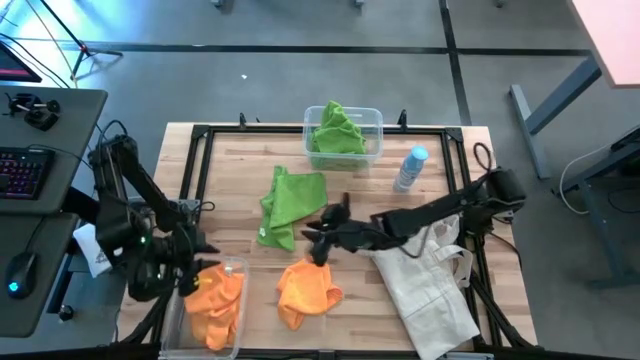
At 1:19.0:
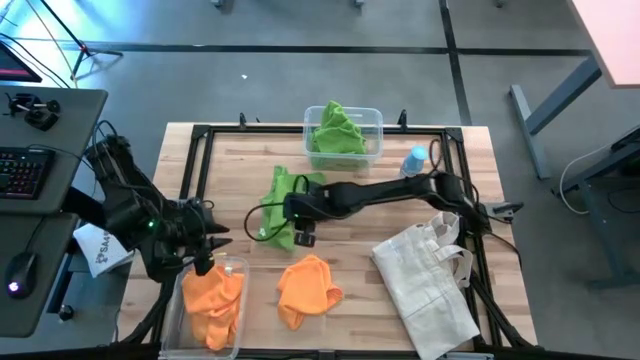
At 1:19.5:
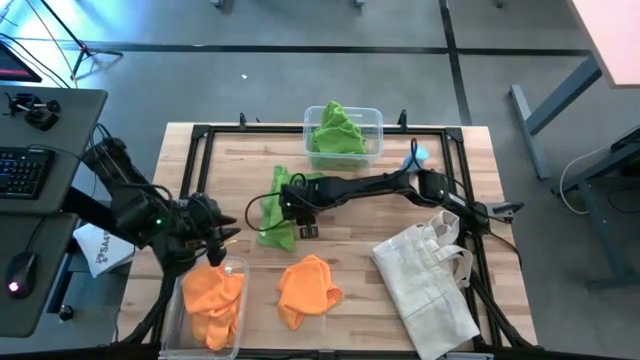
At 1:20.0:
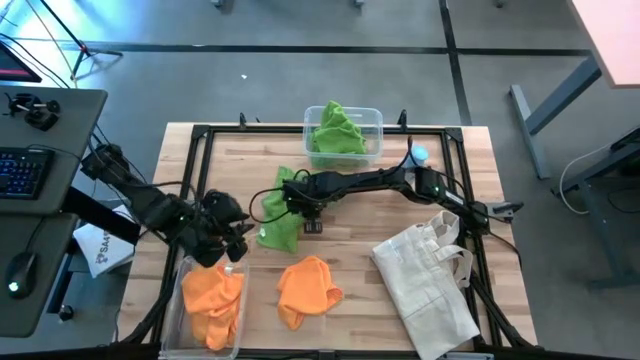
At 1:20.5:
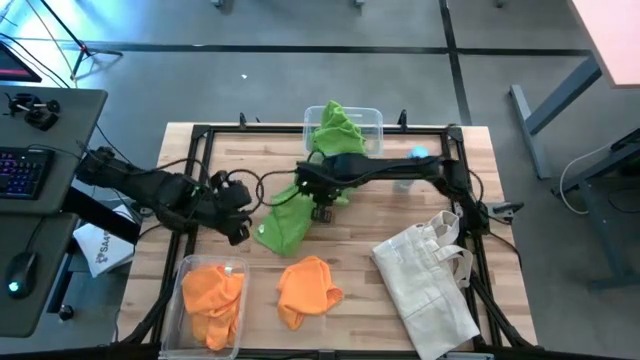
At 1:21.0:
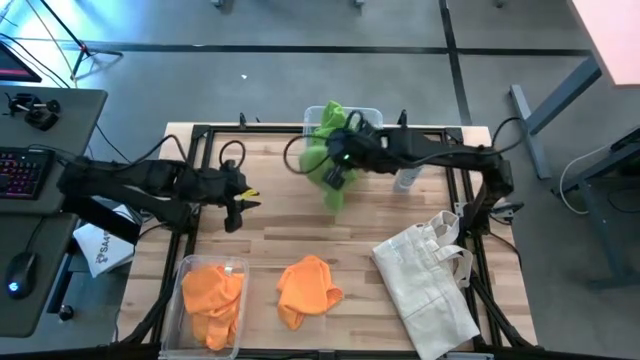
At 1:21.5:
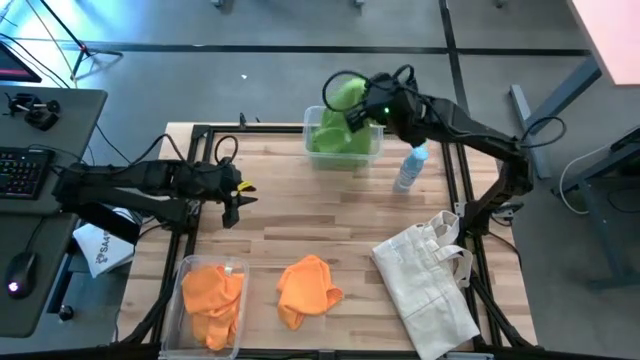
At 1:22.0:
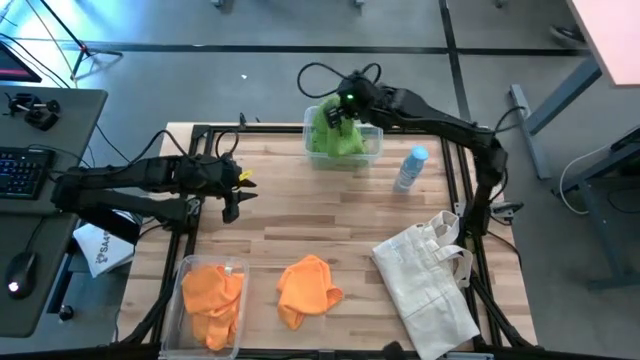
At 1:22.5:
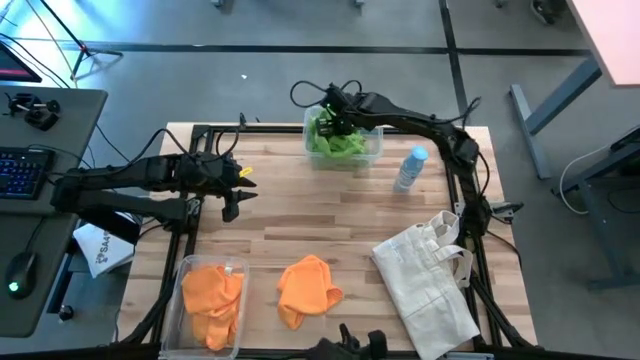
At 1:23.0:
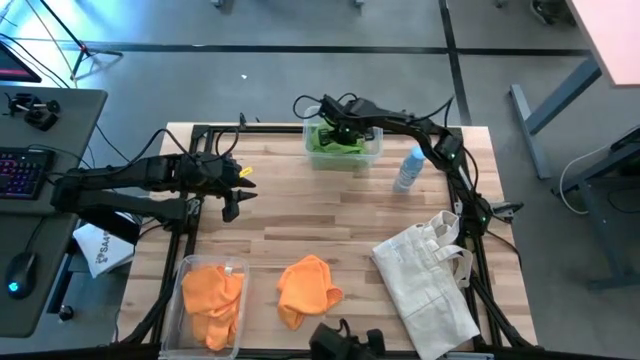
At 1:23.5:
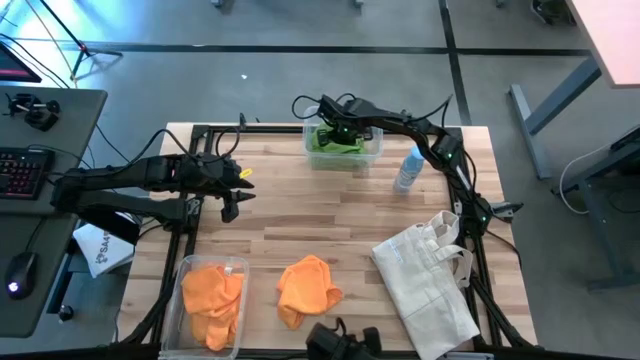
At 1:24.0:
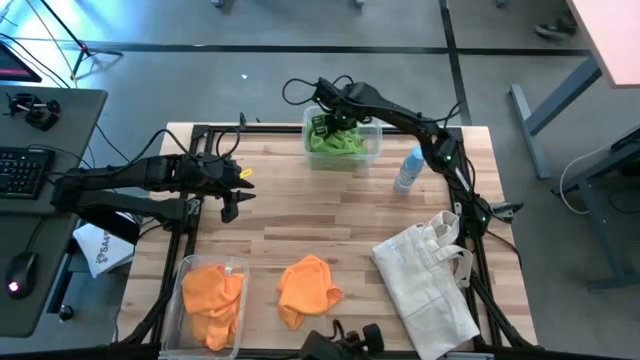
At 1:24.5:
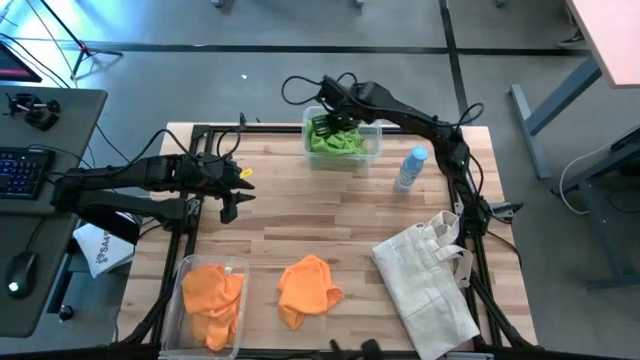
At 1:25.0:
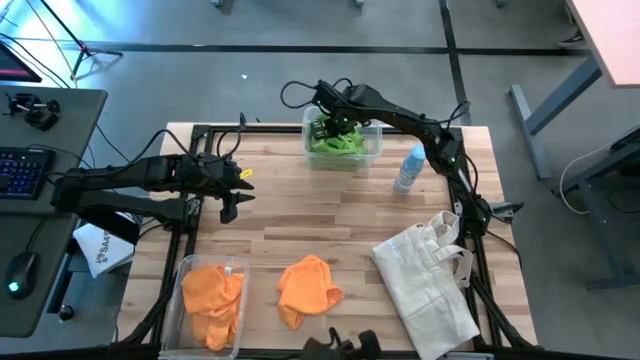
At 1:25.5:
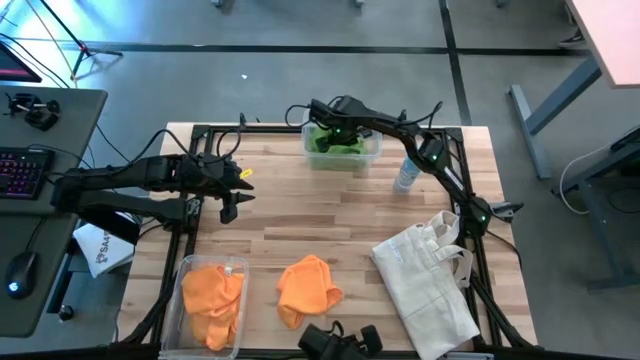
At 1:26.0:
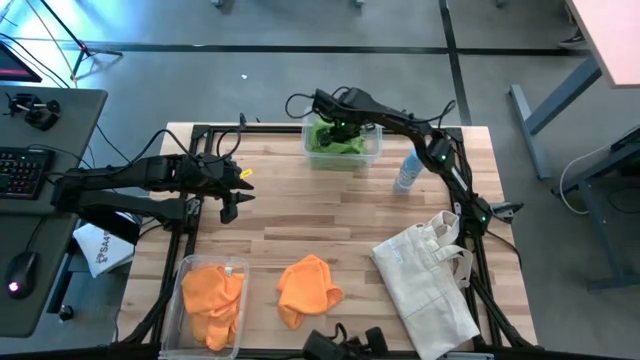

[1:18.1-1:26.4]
Task: Sort microfiber towel by color & place in baskets
Put the green microfiber towel into the top transparent bin

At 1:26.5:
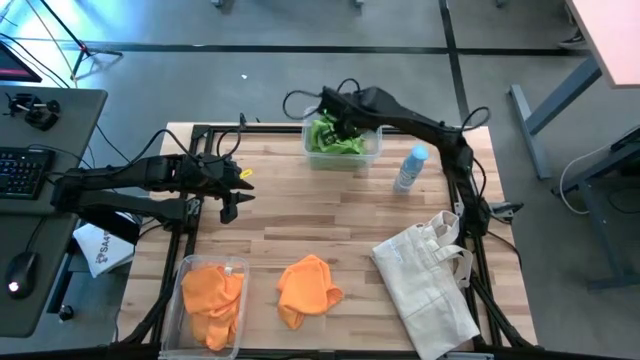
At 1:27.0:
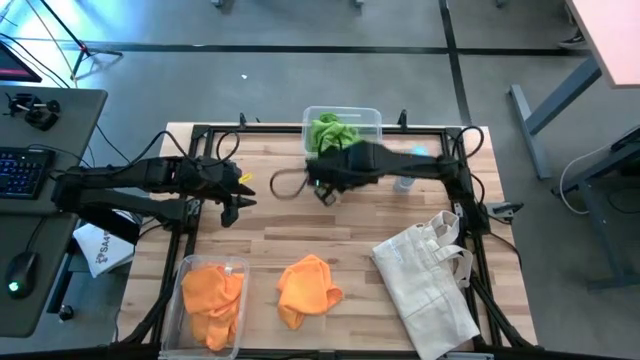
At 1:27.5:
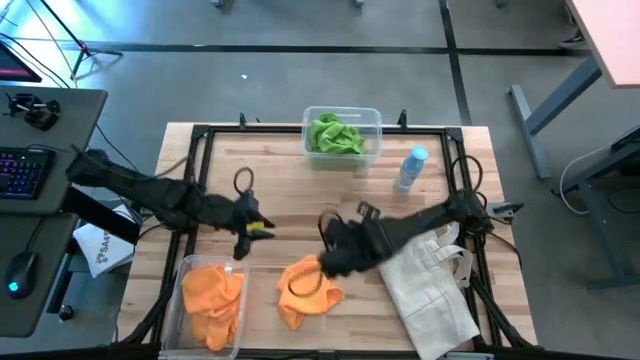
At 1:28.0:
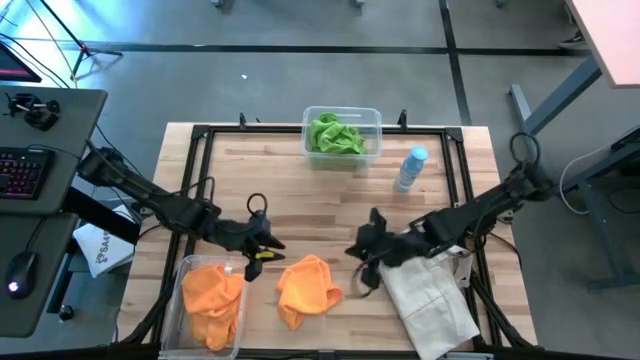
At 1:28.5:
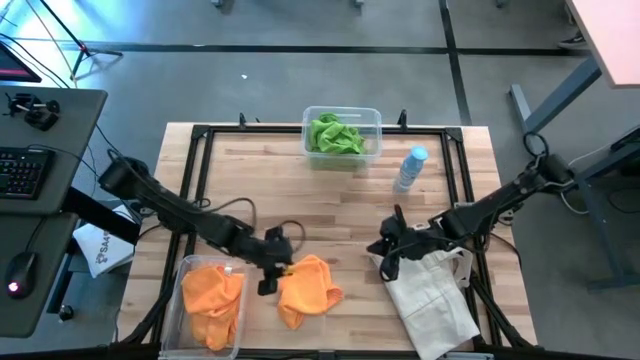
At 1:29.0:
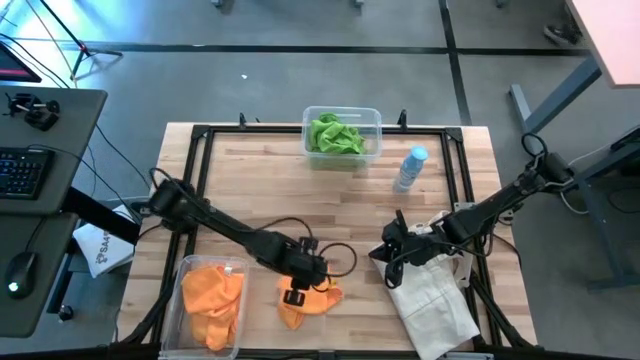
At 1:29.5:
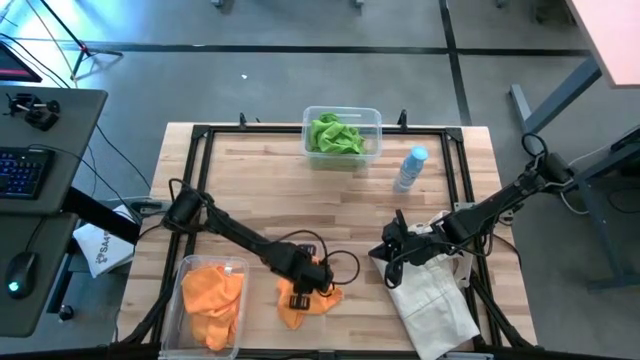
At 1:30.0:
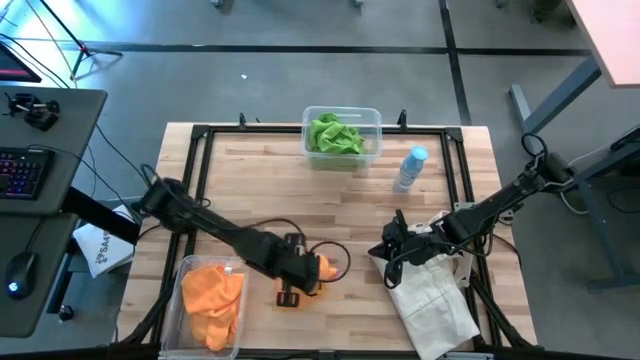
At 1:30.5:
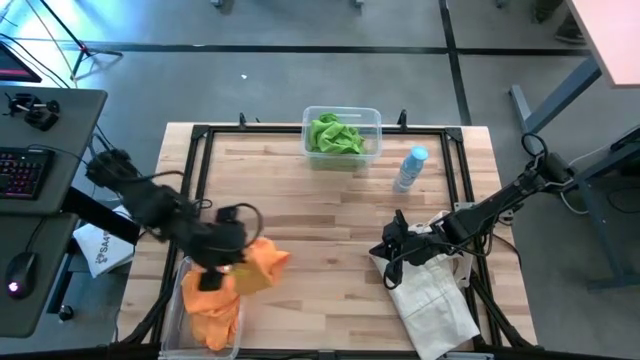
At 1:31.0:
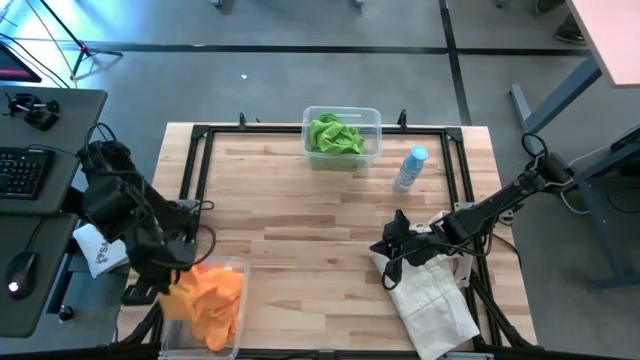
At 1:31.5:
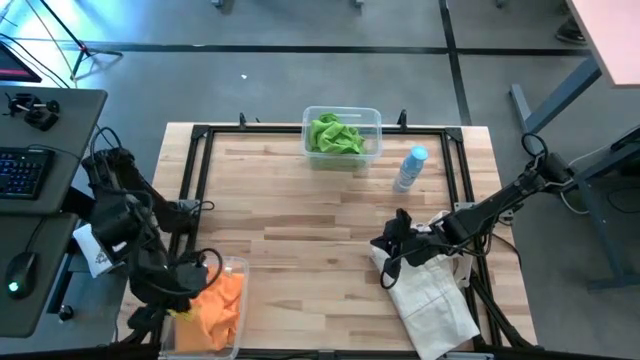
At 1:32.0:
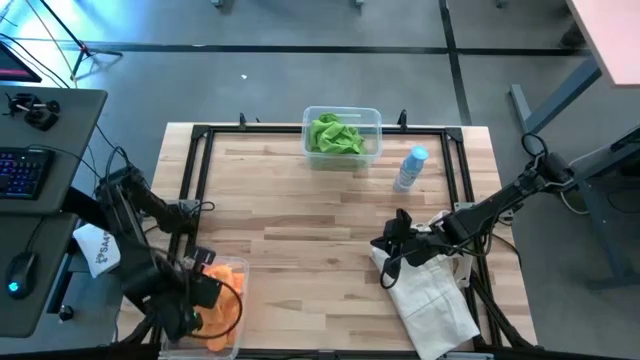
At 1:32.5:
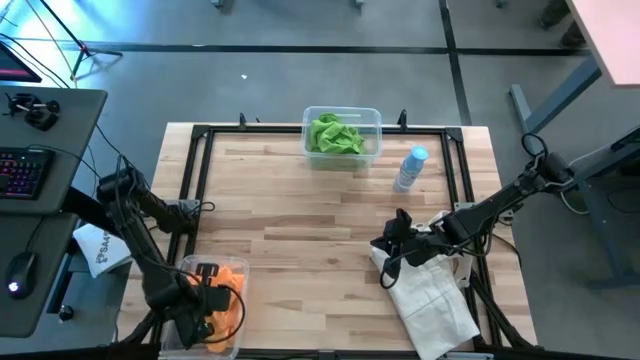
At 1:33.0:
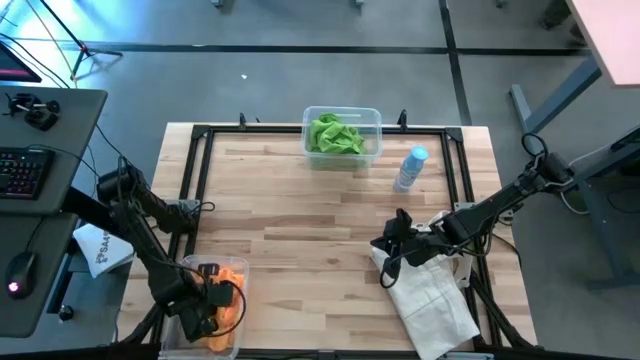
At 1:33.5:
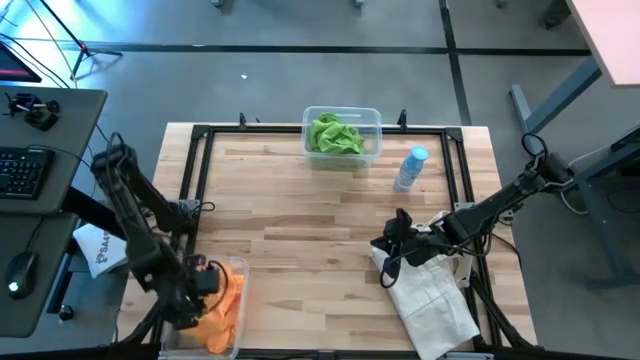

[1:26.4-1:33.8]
Put the orange microfiber towel into the bottom transparent bin

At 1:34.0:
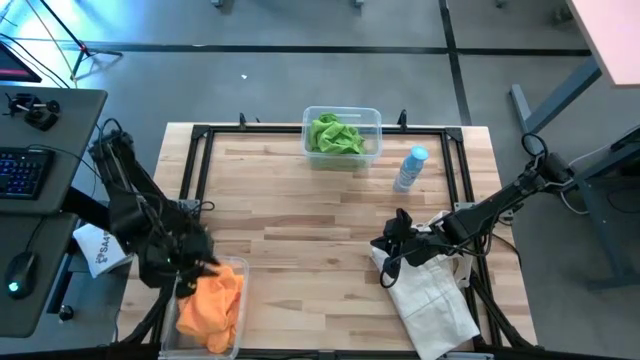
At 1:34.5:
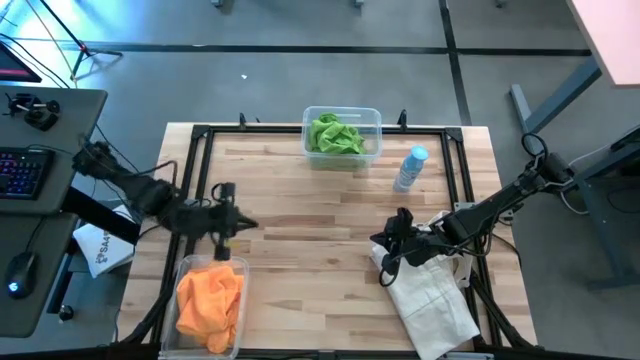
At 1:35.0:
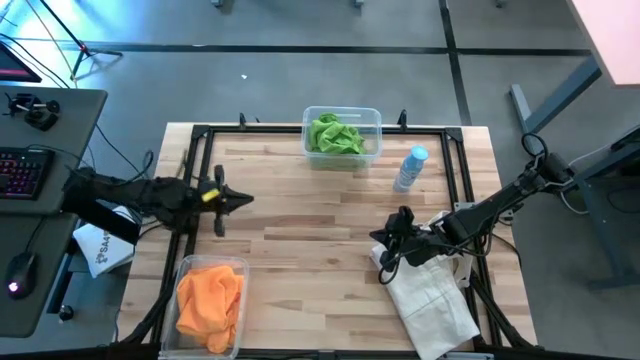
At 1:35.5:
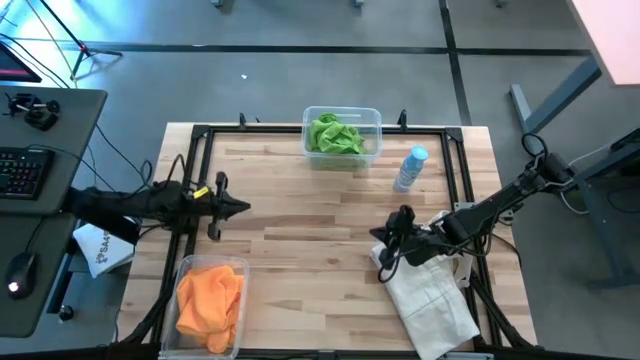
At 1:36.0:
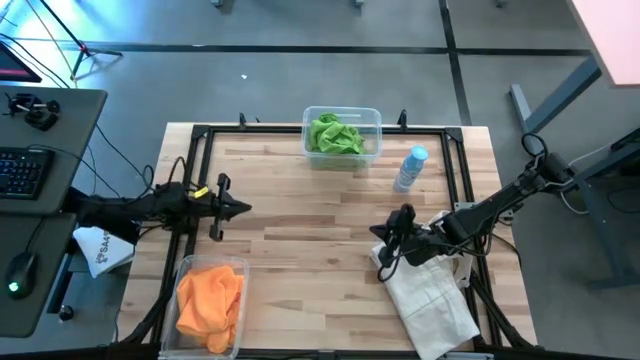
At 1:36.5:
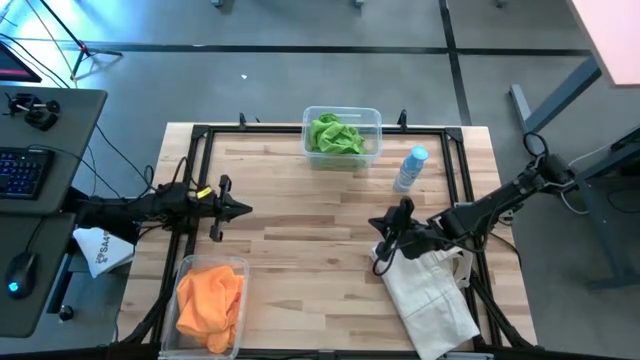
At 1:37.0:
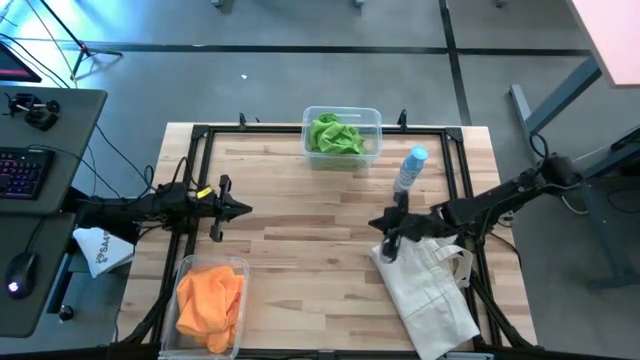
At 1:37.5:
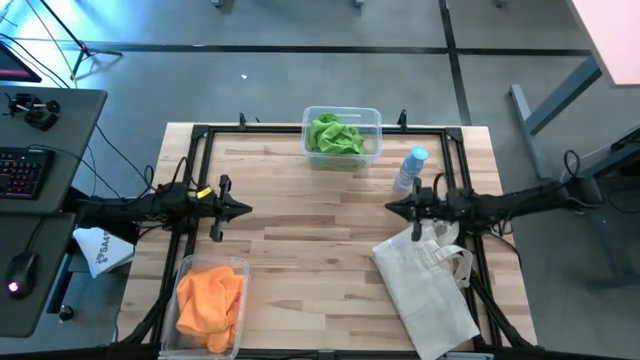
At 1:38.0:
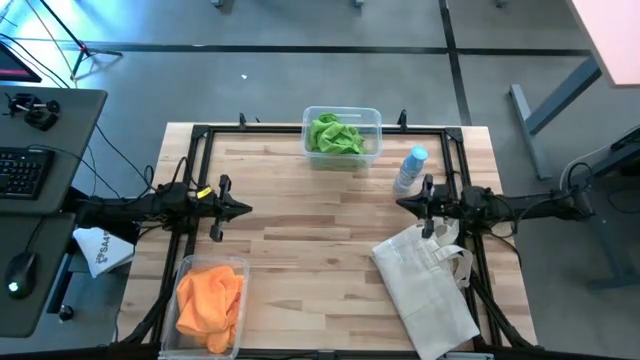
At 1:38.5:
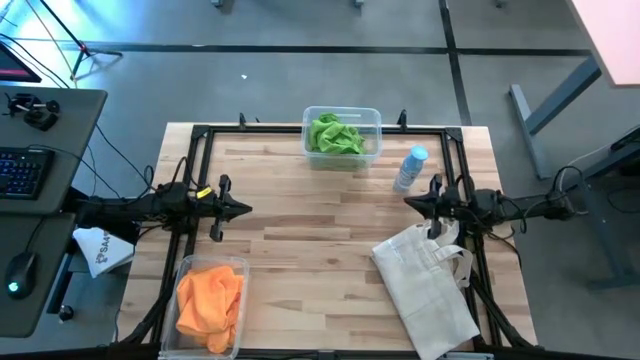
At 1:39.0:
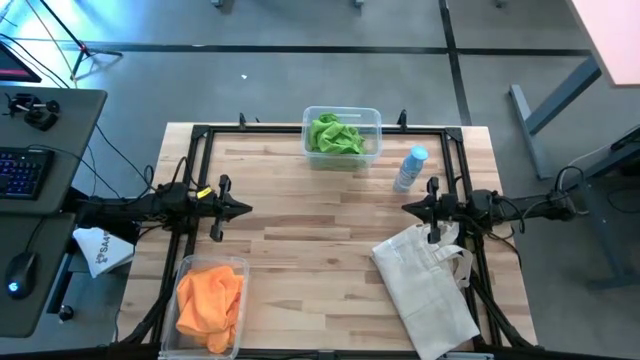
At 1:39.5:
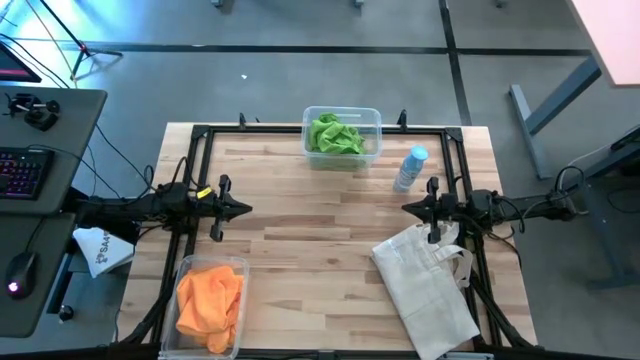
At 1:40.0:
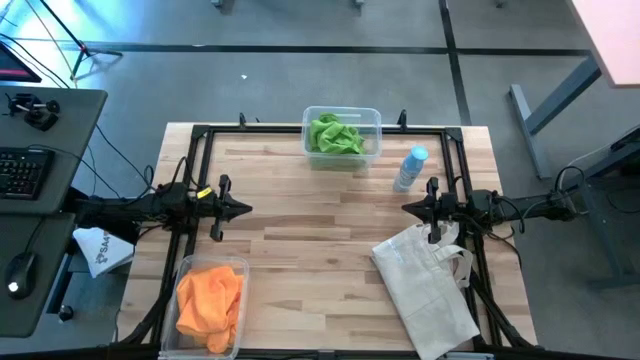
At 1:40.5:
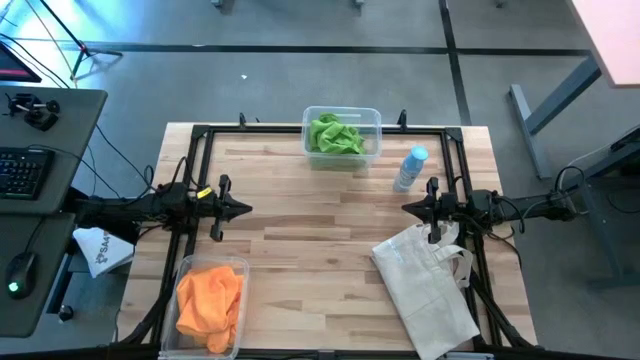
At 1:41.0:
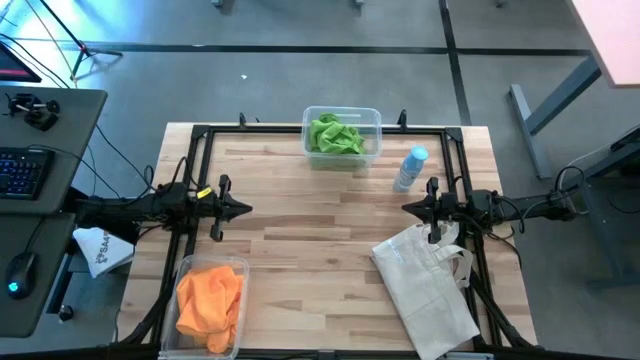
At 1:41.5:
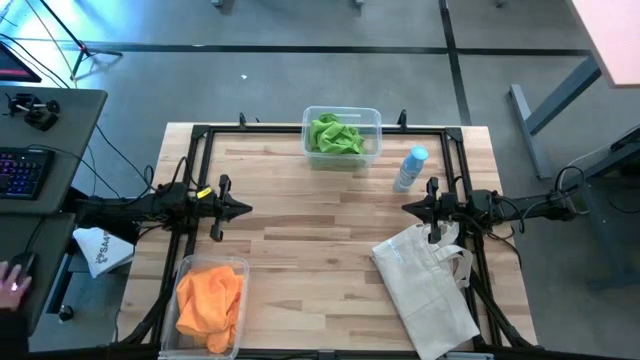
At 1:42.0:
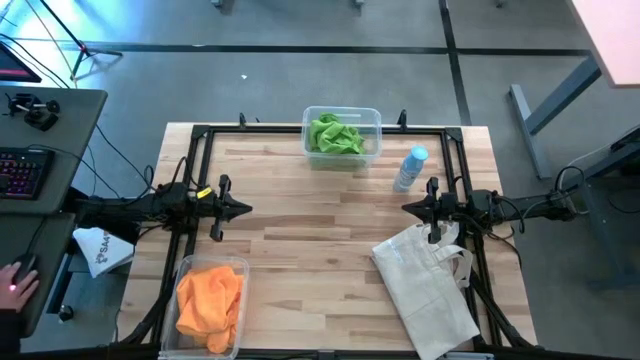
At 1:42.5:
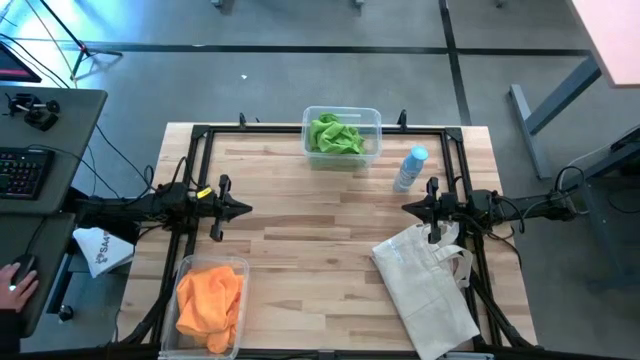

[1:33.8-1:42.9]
Return to Home Position
